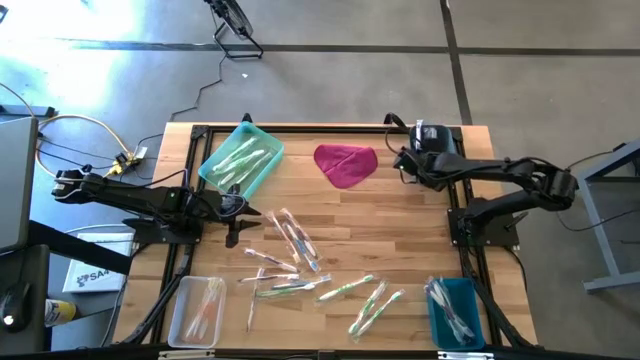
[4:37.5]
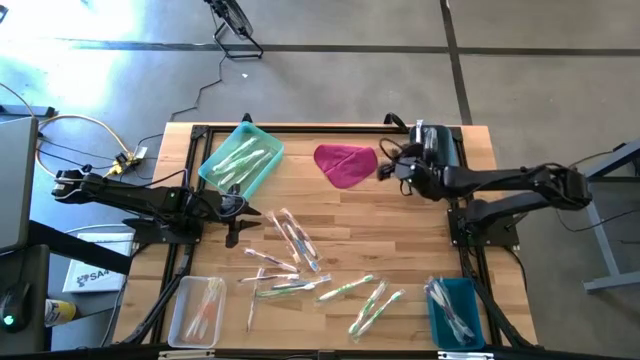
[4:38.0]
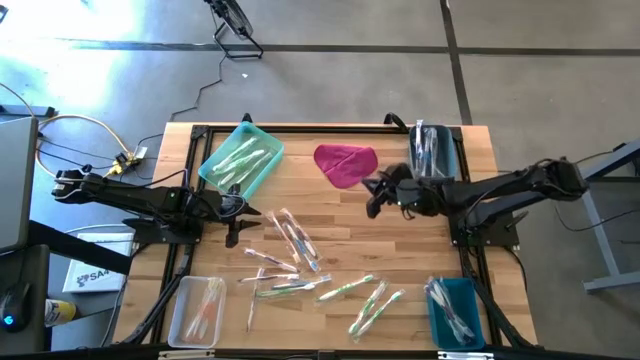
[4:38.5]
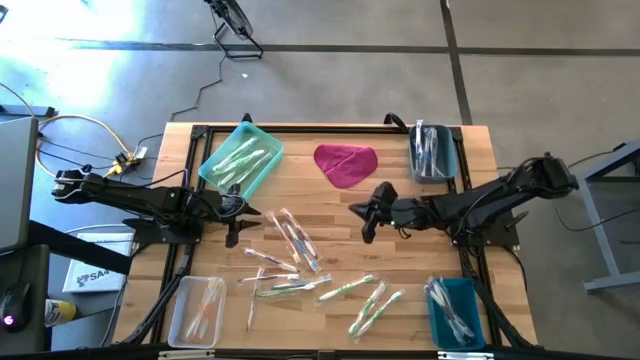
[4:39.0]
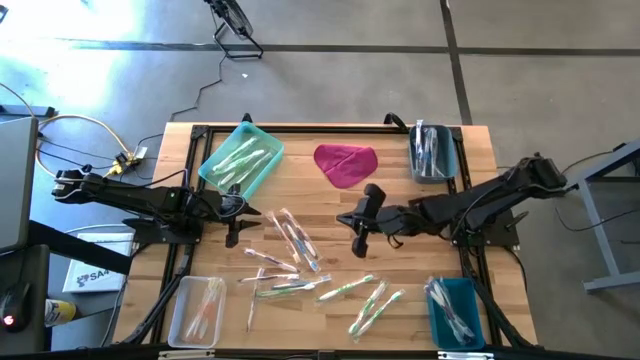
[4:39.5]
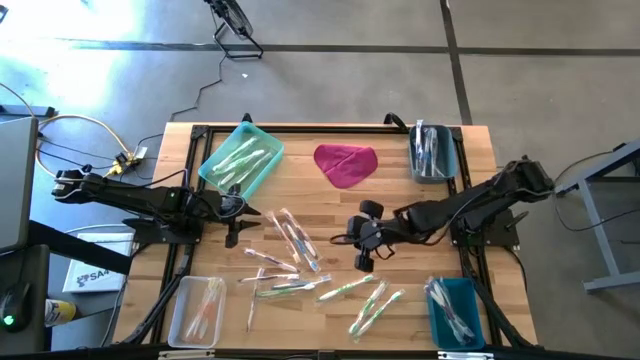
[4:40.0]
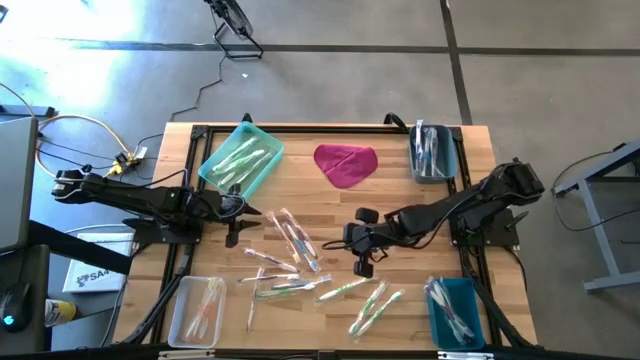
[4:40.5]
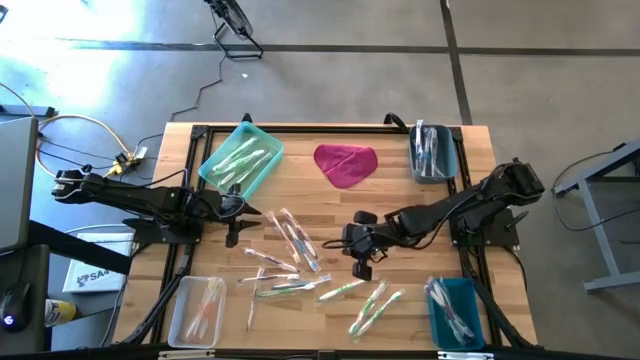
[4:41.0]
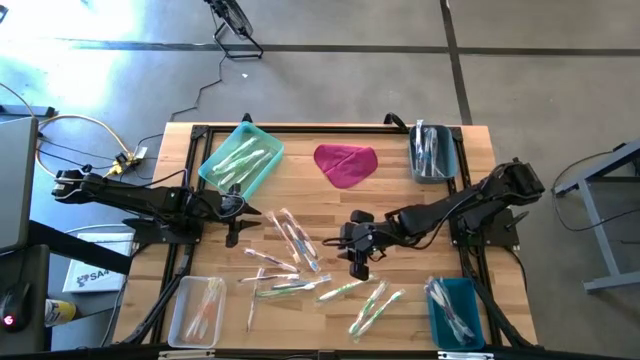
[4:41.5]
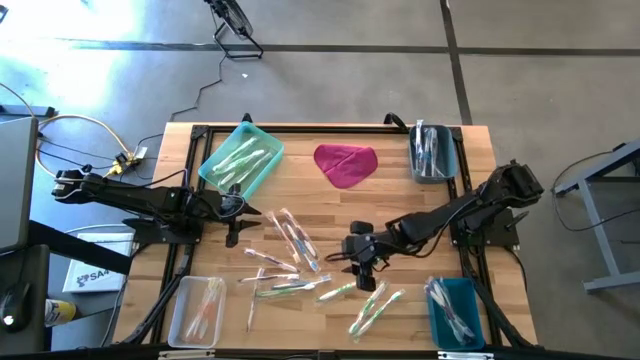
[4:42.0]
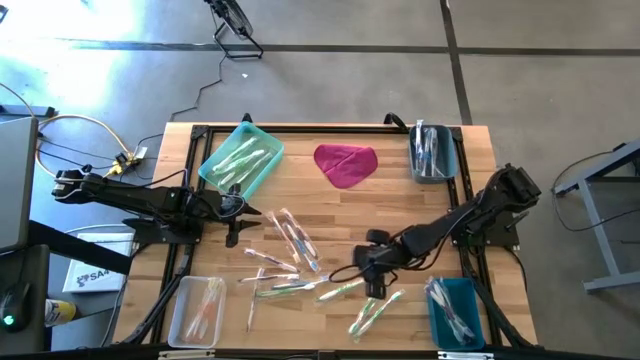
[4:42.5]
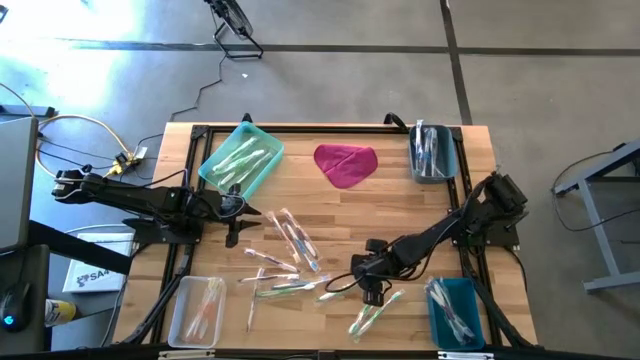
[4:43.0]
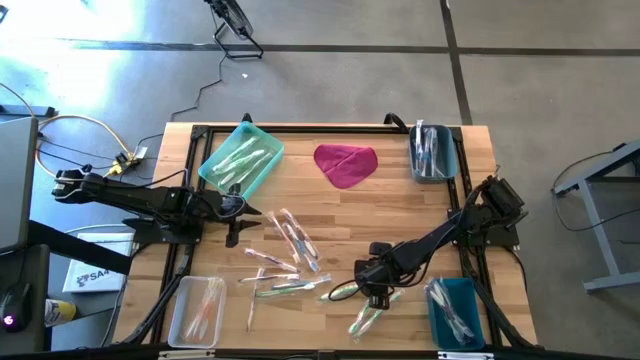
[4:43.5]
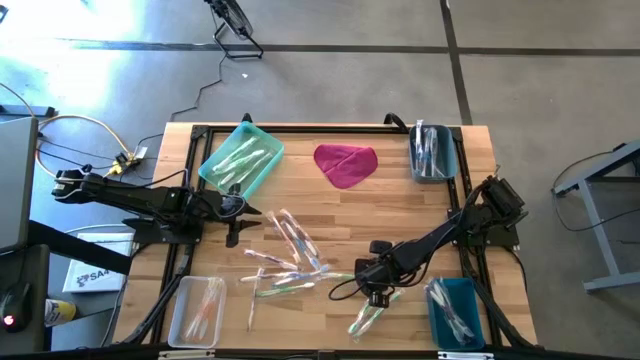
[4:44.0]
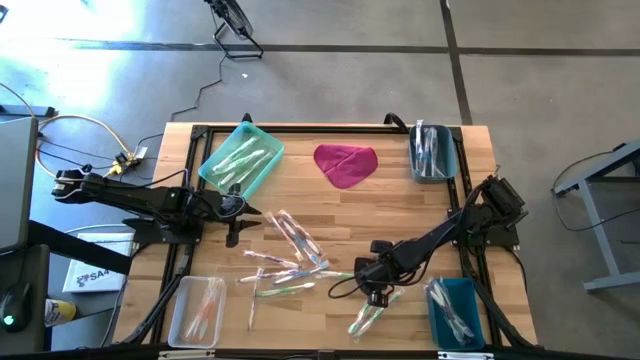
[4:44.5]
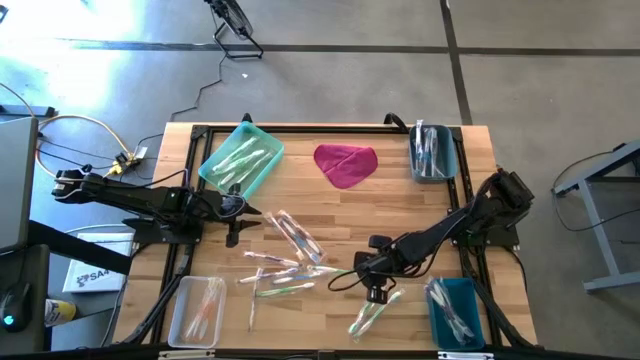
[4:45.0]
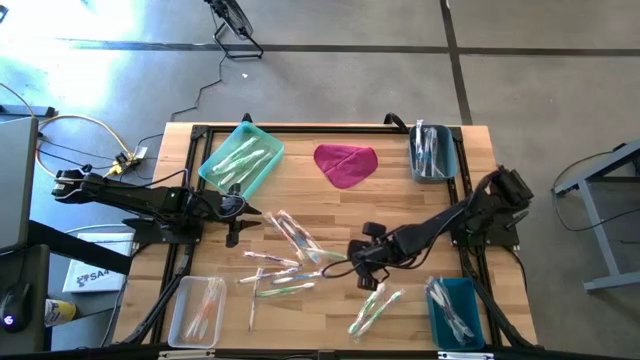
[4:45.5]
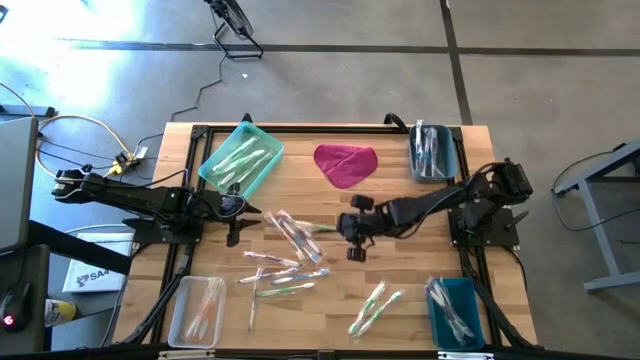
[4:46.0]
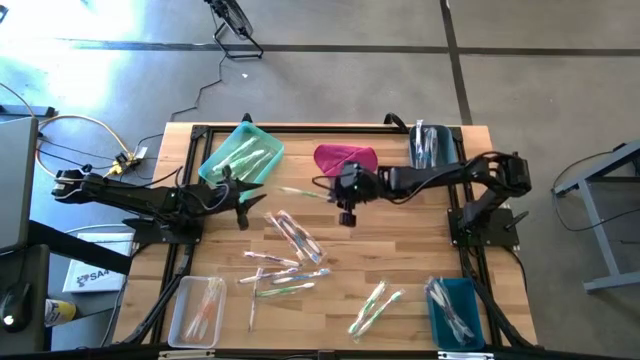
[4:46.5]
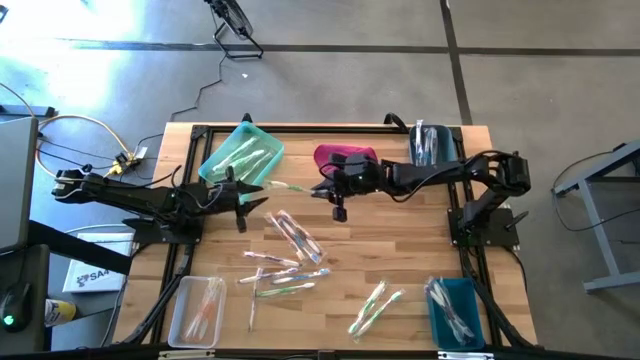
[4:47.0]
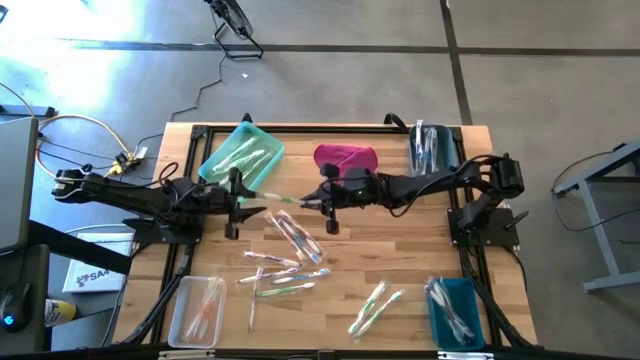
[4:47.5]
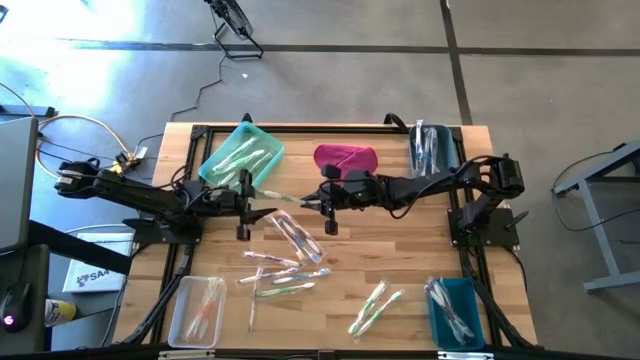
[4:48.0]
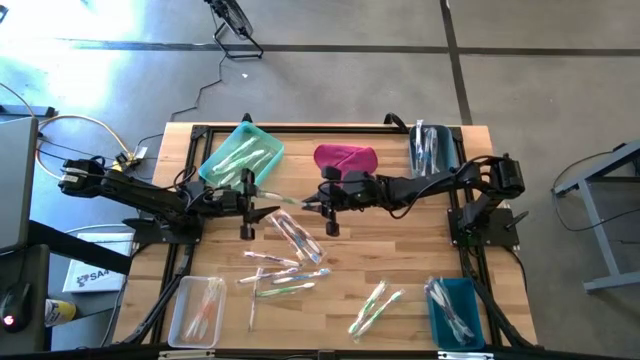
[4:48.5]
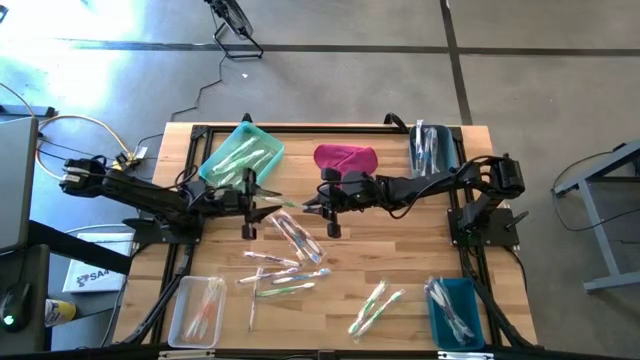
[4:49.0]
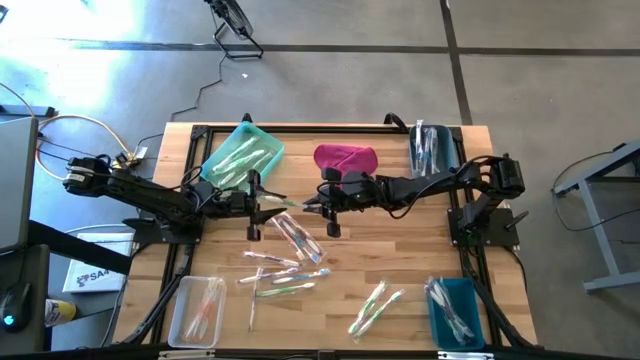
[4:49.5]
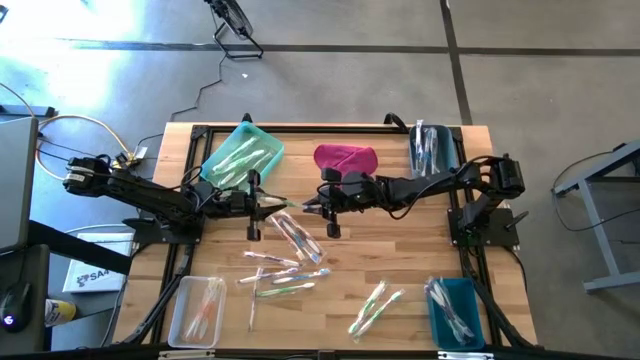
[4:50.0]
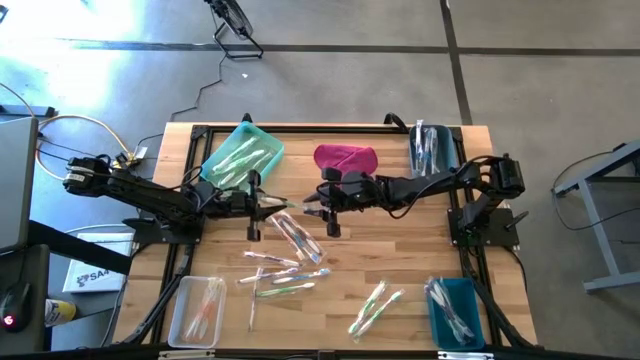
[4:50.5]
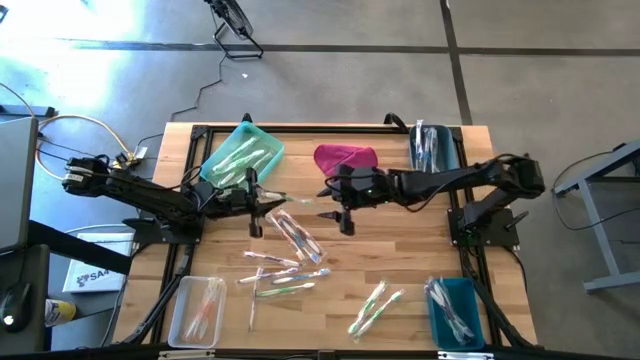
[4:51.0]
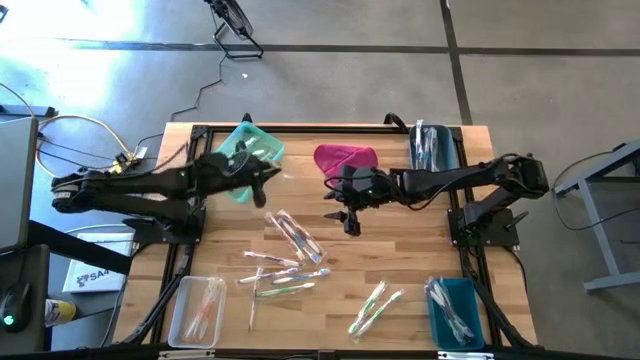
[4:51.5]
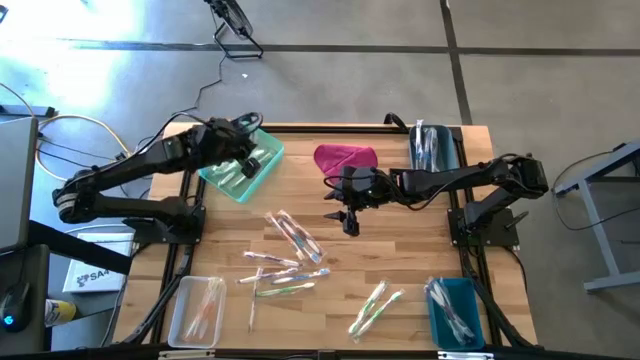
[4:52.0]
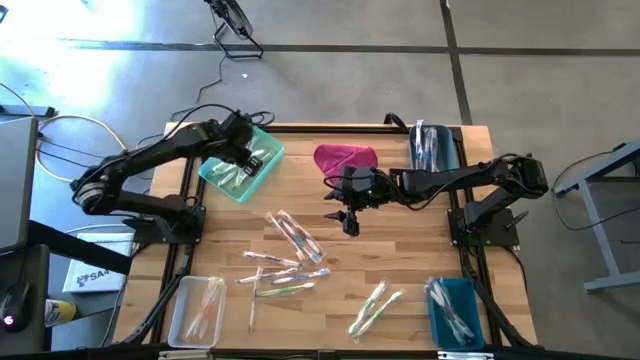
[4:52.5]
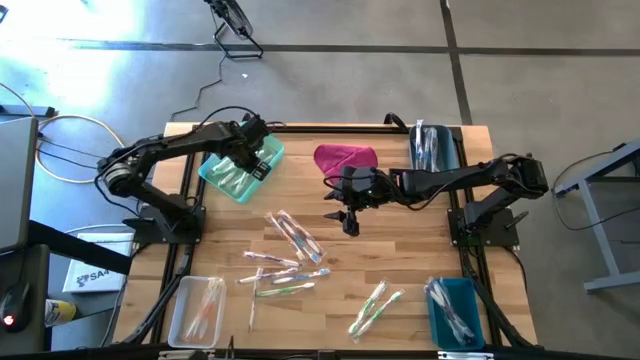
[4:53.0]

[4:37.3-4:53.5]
Task: Pick & Place Toothbrushes
Put the green toothbrush to the green bin

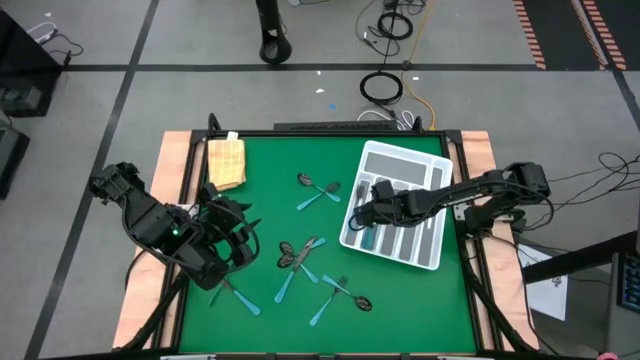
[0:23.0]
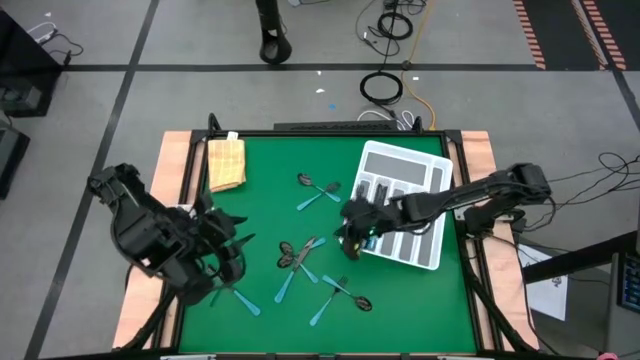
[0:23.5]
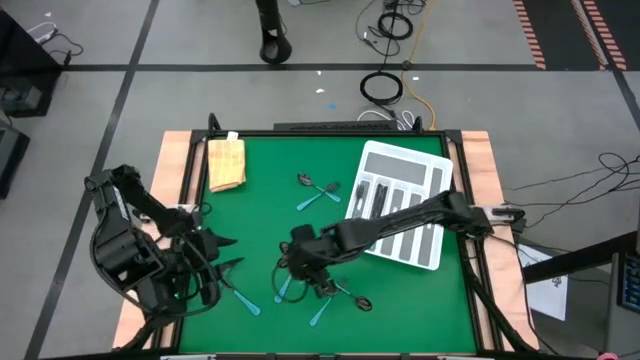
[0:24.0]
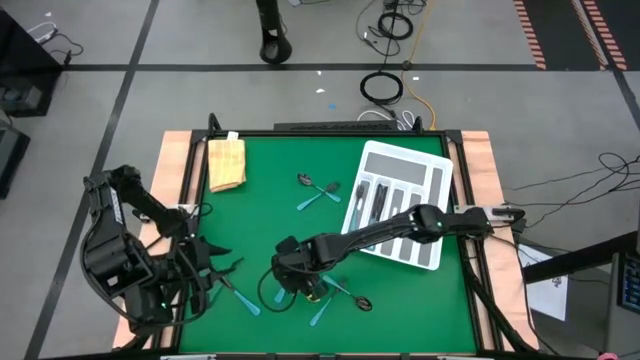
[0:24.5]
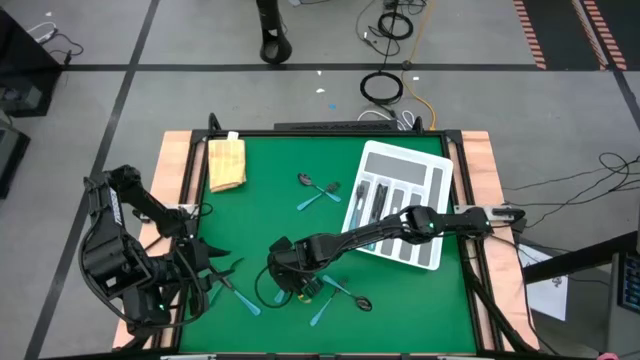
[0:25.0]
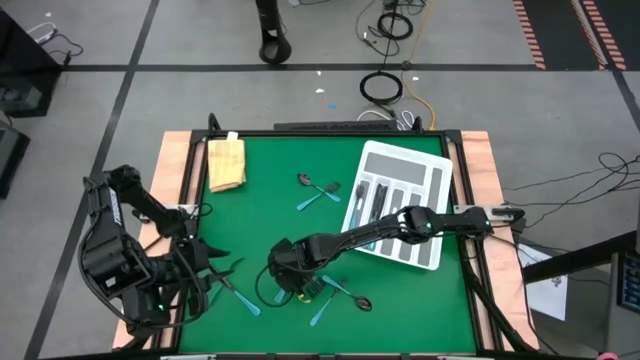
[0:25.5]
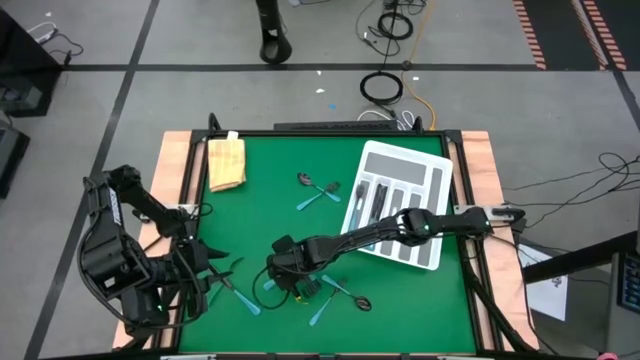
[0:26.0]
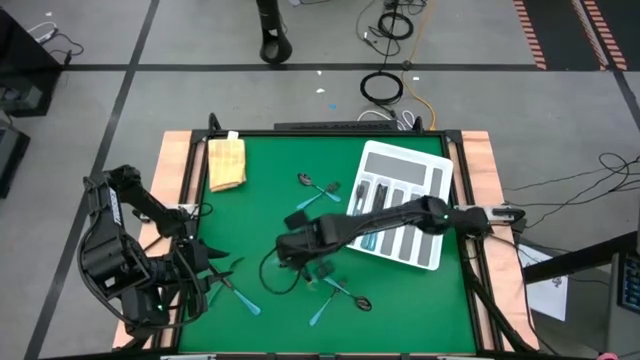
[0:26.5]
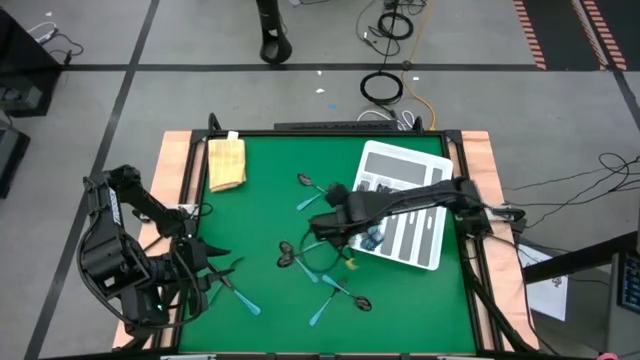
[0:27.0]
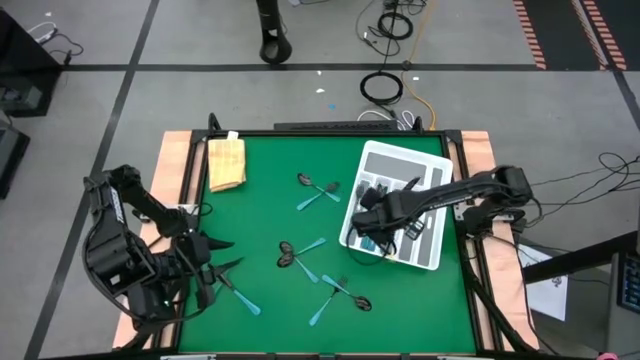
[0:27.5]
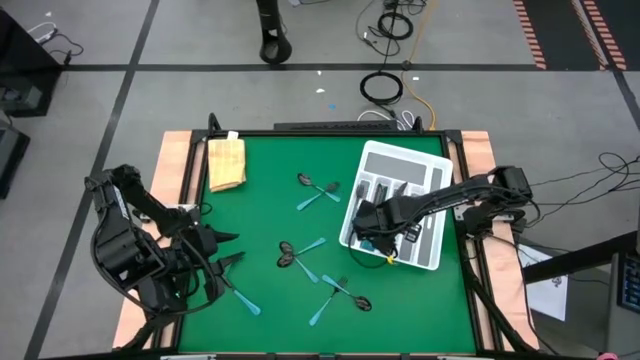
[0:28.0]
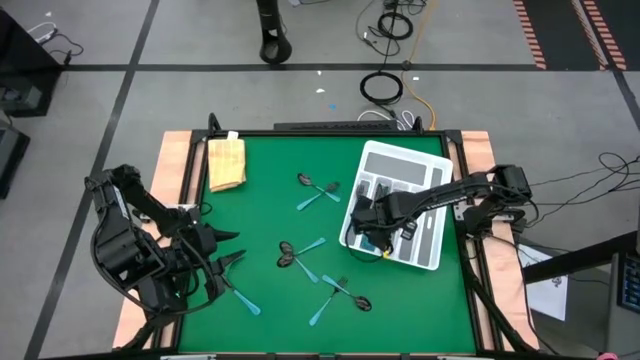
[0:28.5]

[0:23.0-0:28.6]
Task: Sort silverware
Put the blue table knife into the white cutlery tray
